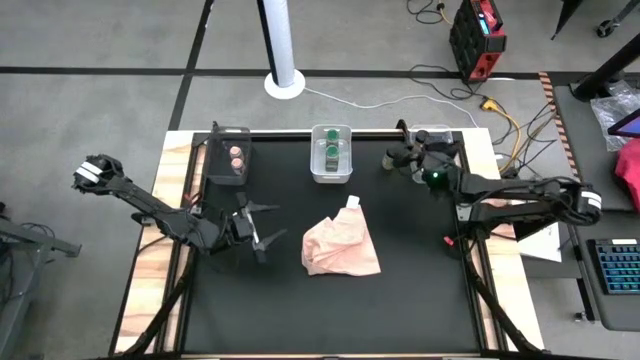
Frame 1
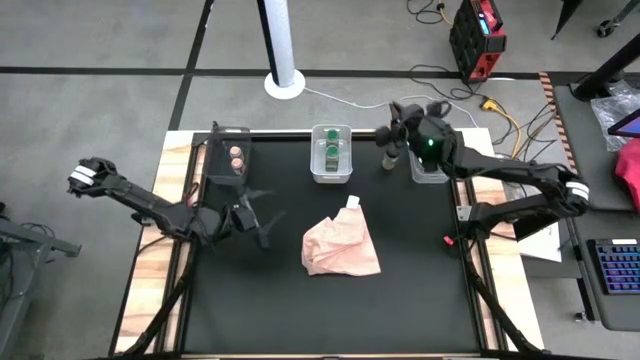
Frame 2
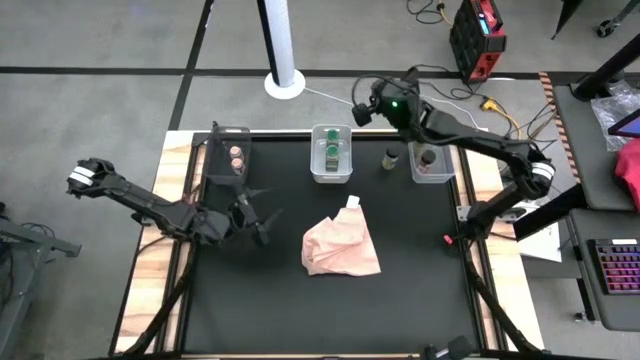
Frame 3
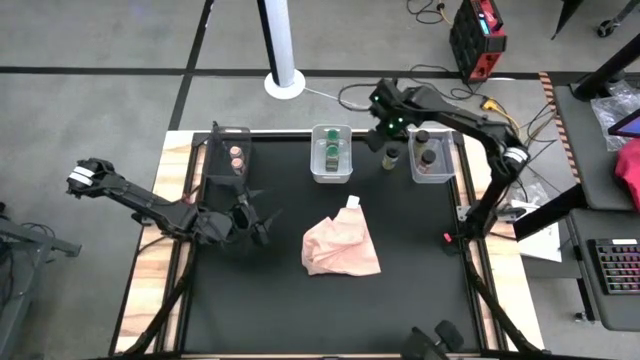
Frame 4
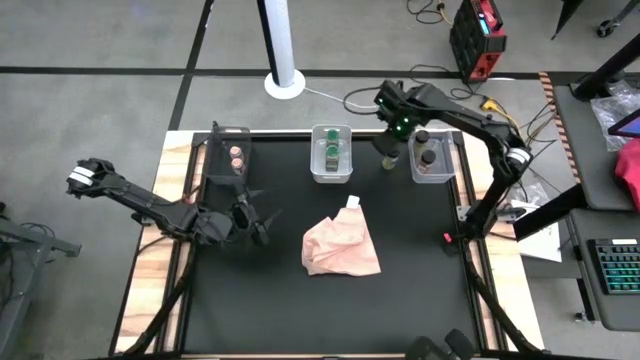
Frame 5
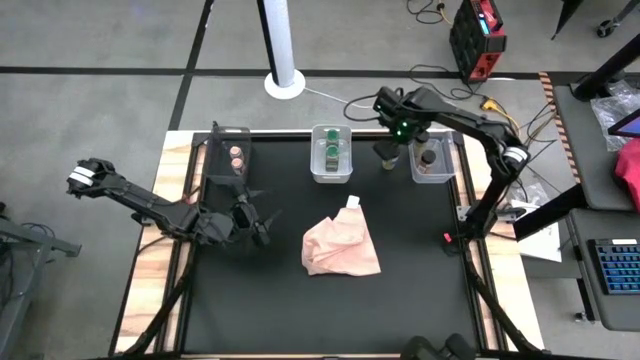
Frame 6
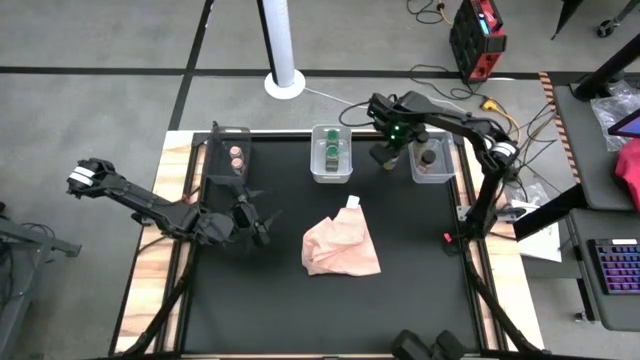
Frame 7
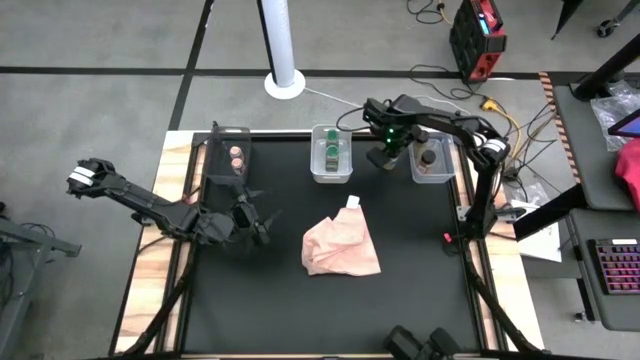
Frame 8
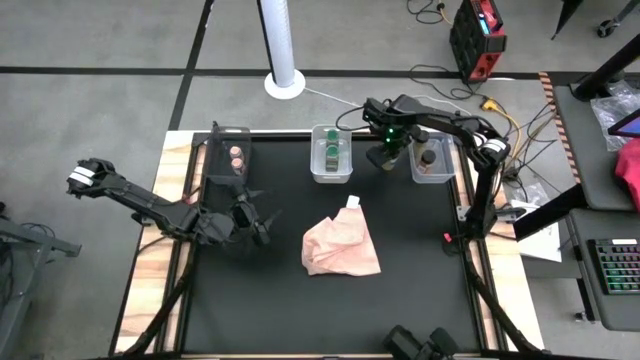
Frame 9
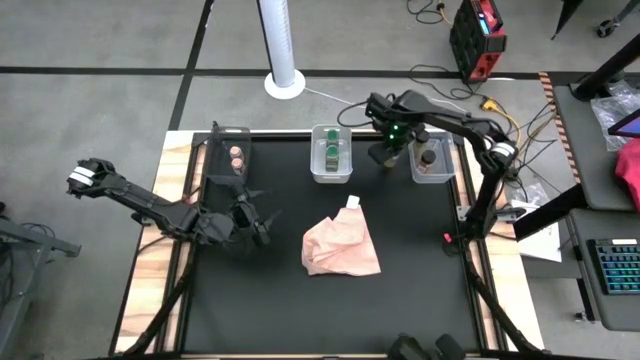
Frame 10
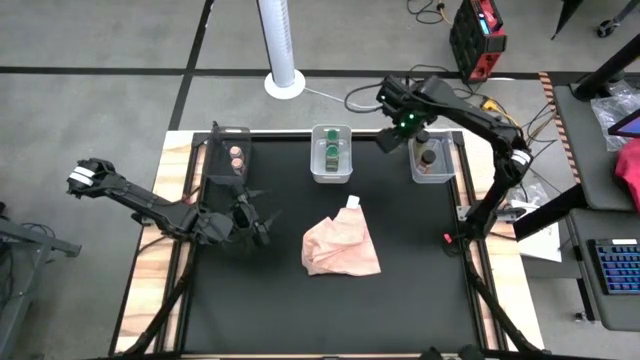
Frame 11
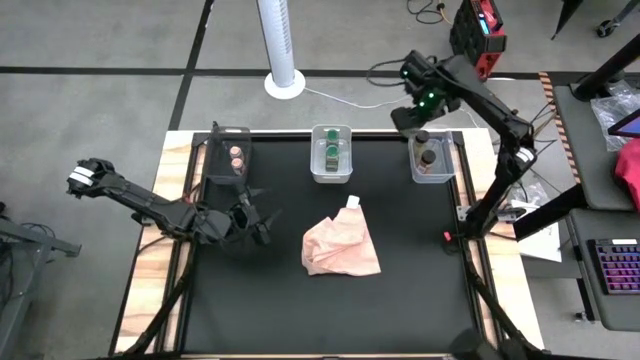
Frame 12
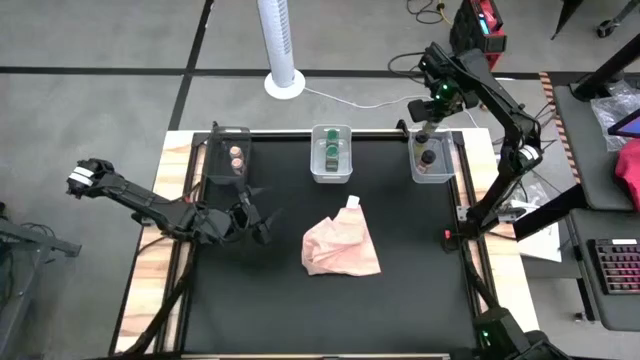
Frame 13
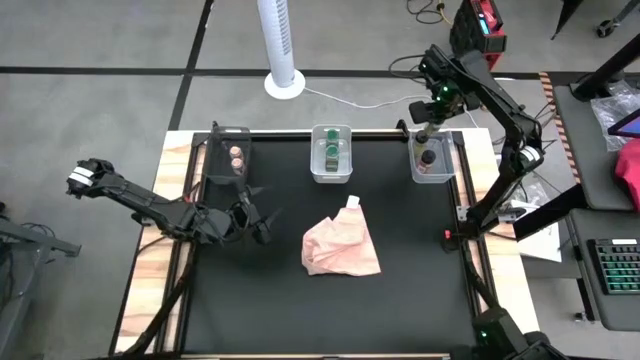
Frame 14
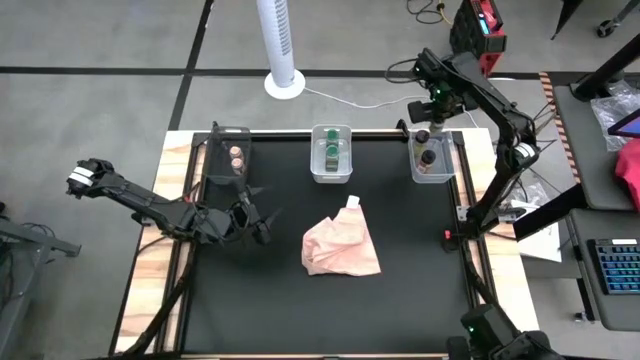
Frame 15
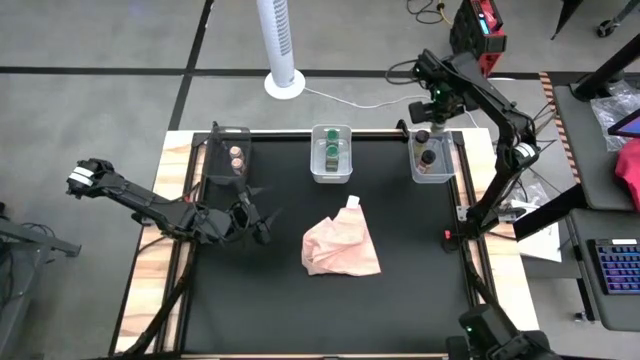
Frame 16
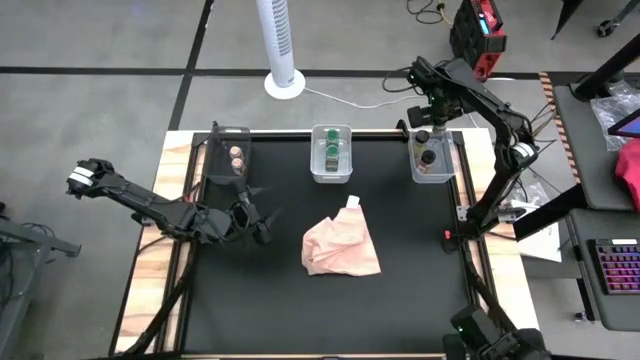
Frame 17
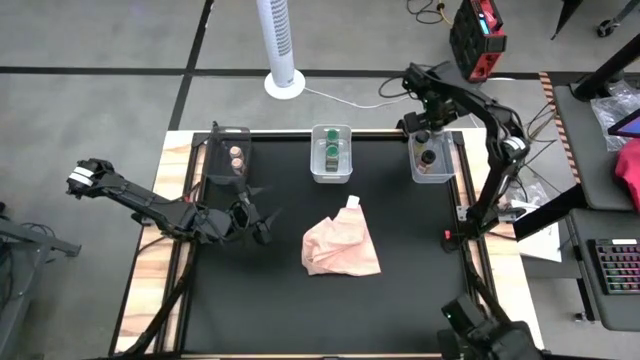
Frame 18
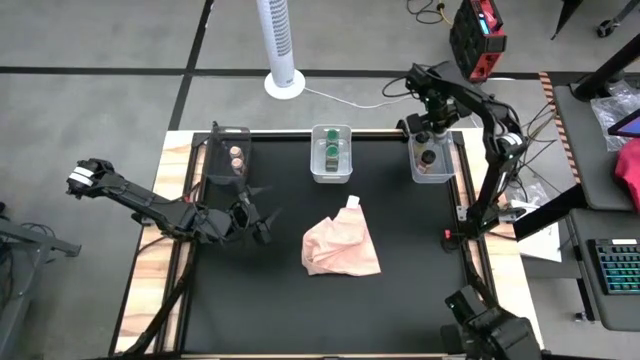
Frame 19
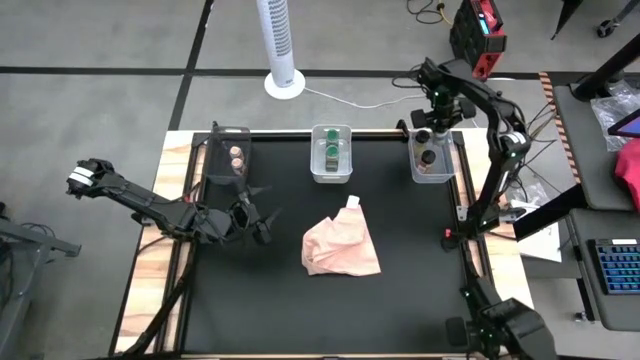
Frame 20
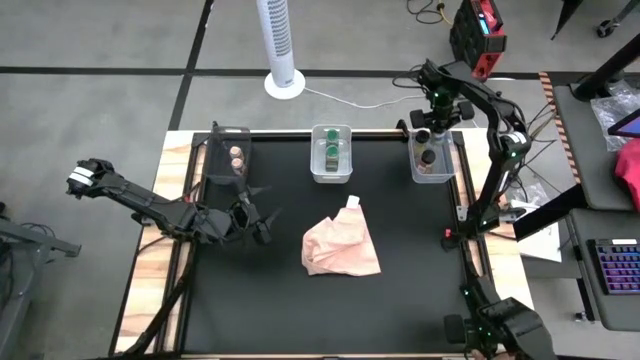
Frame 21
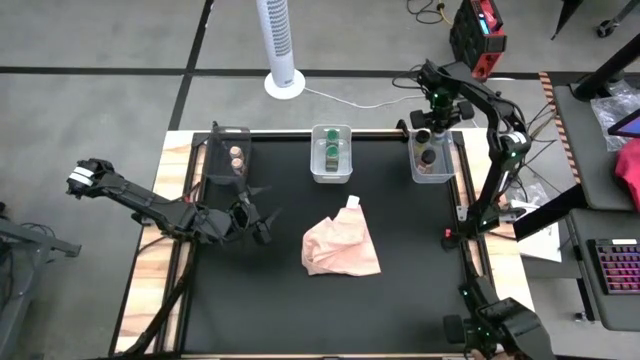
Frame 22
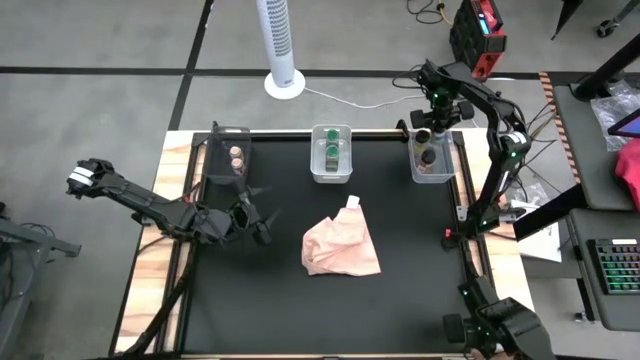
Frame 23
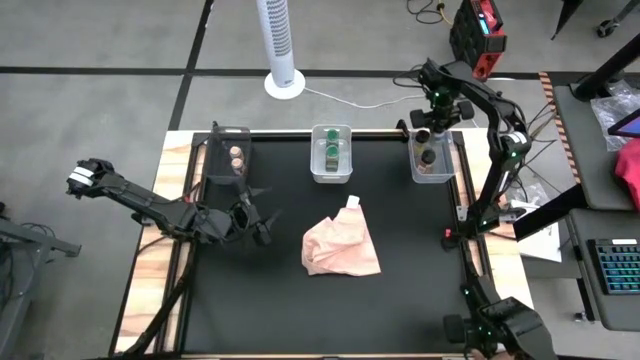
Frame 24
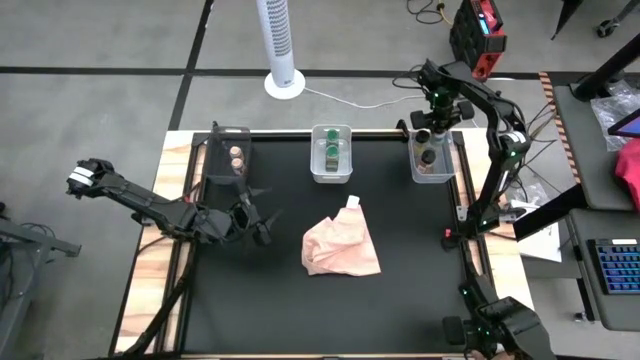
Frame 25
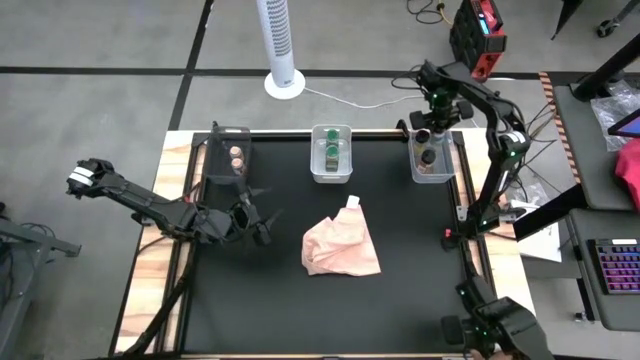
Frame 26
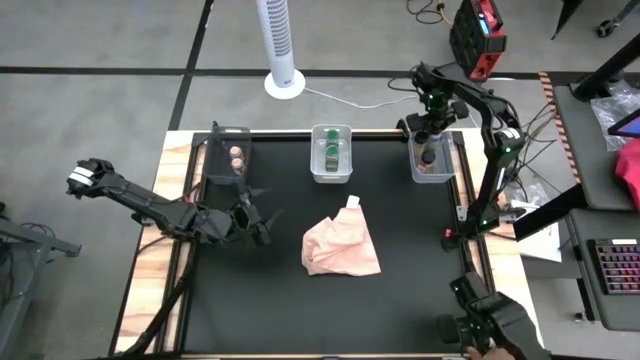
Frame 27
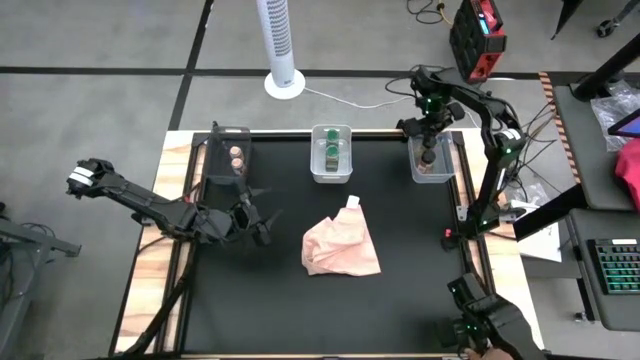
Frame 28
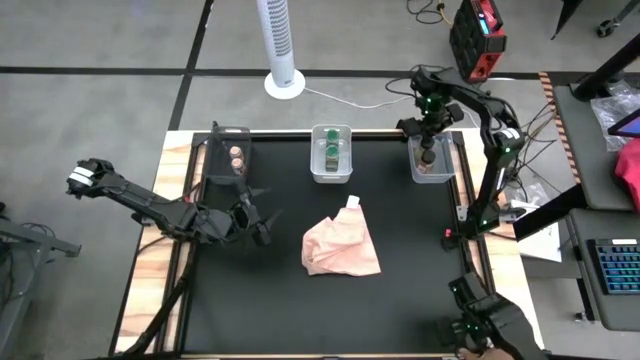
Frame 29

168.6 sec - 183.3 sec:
Task: Sort spices by type
Put the black spice bottle into the transparent bin

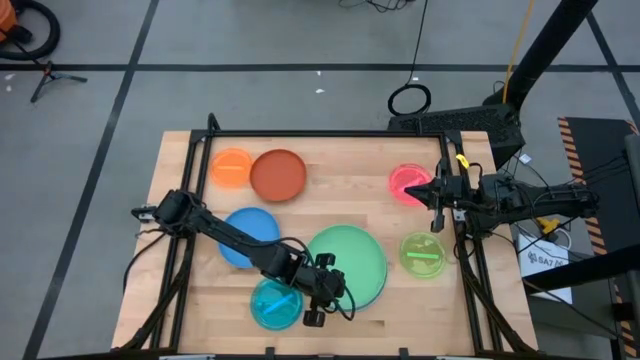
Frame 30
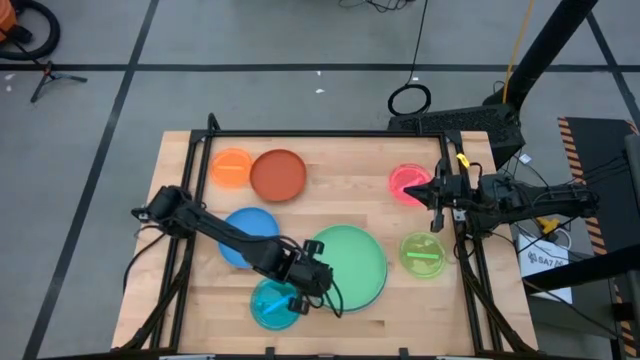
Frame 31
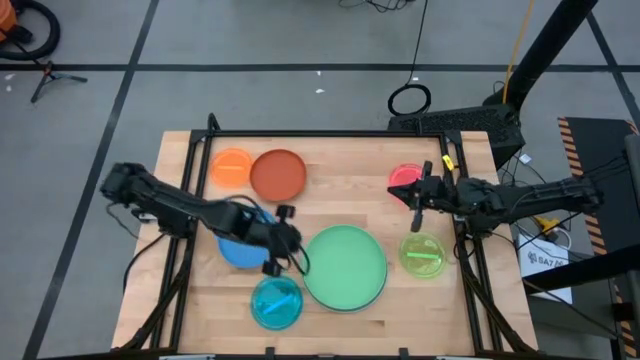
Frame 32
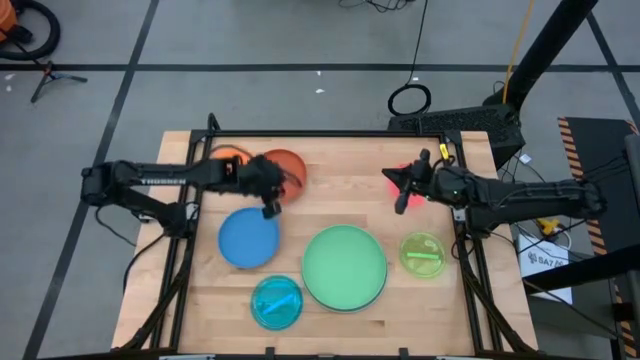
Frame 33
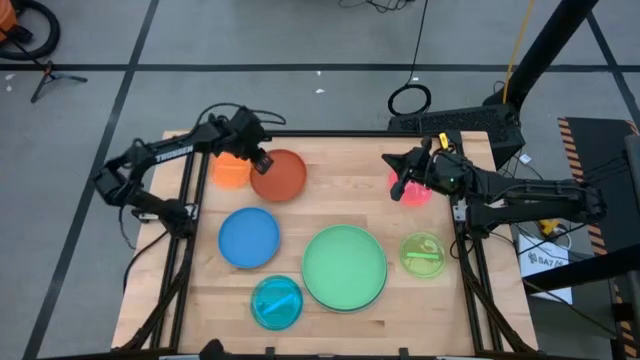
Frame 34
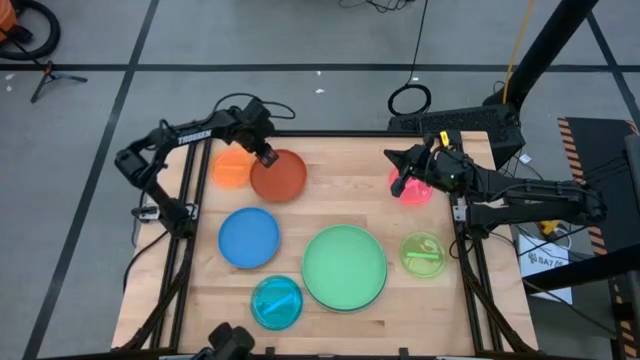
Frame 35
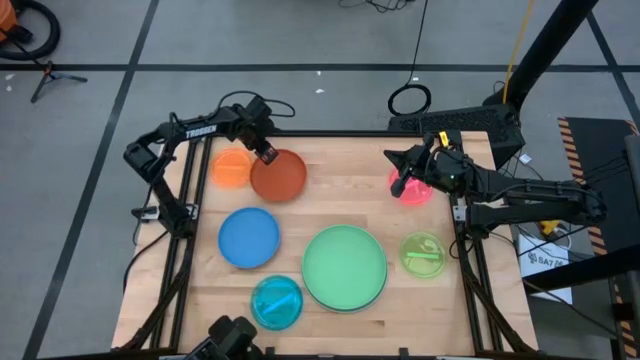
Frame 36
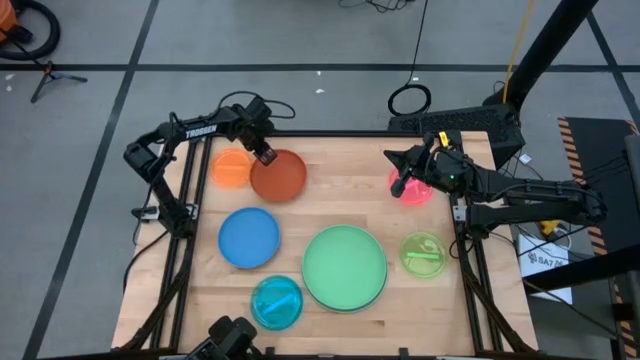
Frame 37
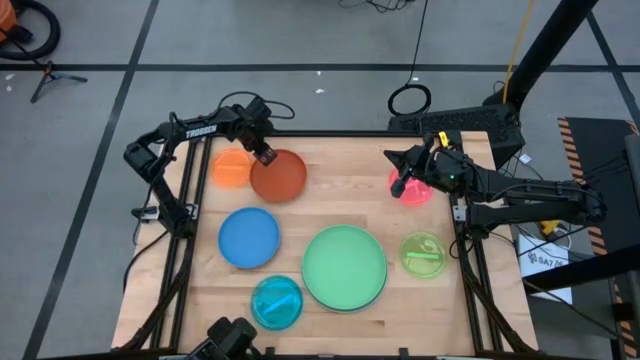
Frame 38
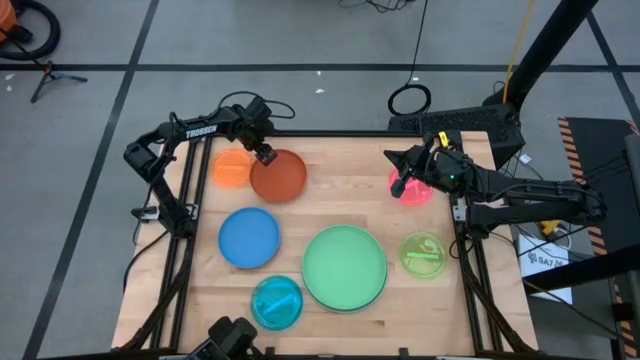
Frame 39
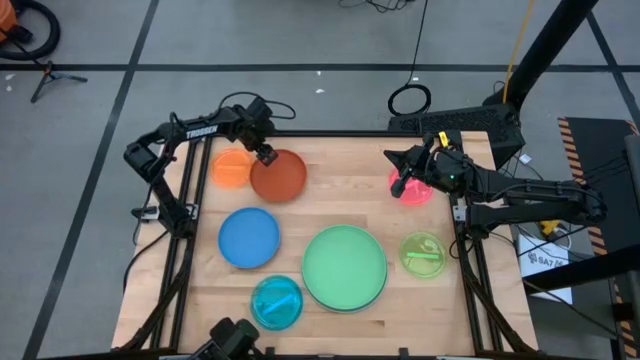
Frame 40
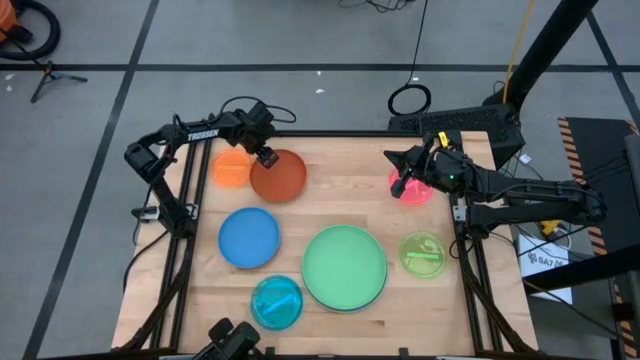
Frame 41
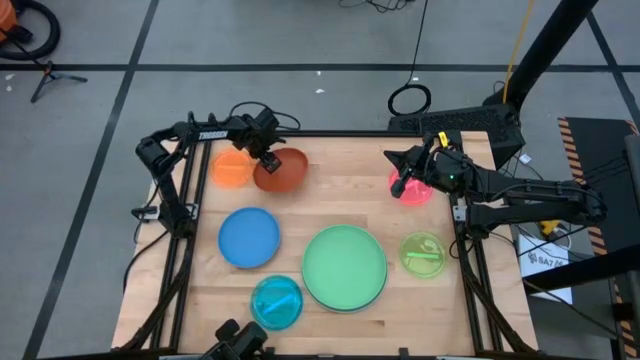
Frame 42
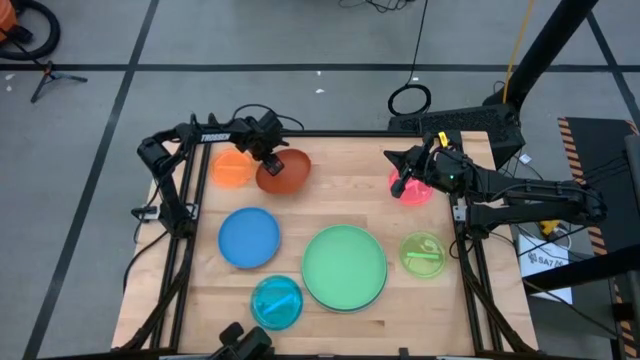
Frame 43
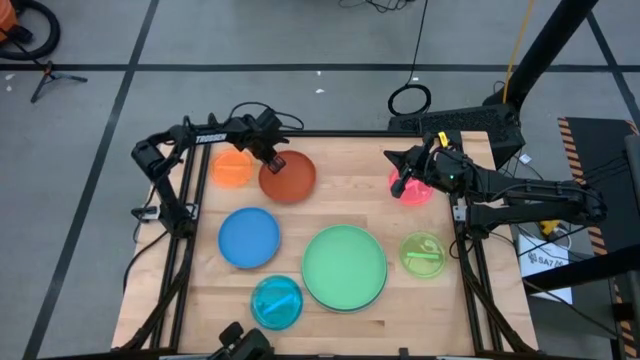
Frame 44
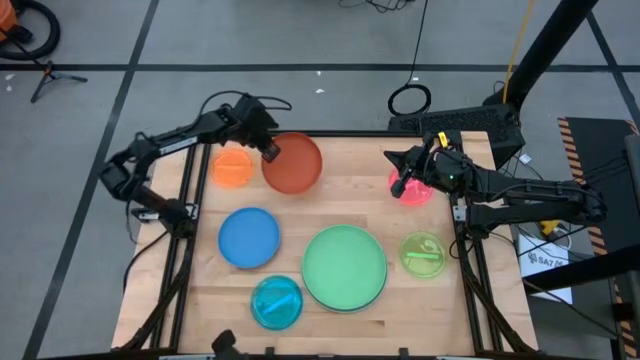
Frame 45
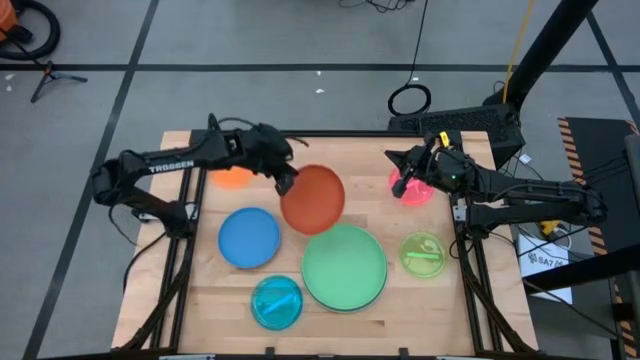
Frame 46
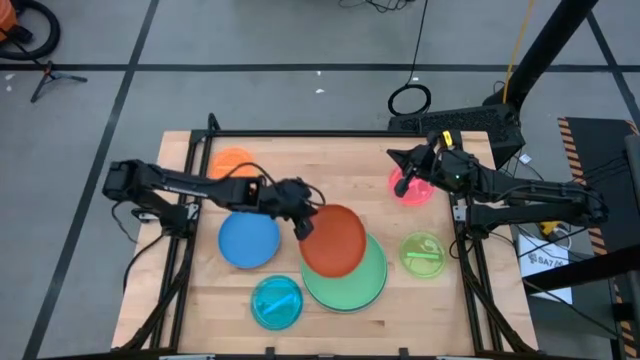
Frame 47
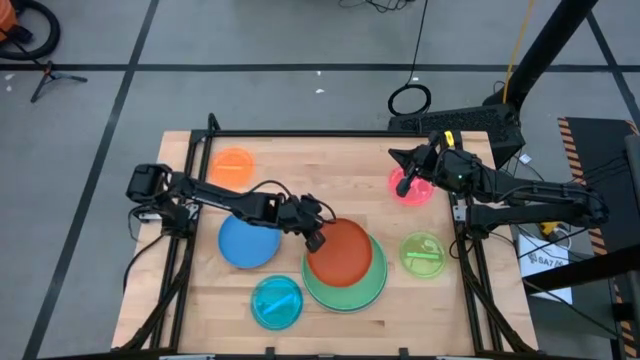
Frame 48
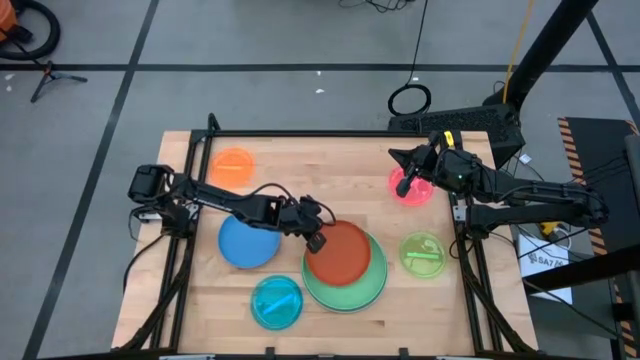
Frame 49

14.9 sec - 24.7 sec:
Task: Stack plastic plates
Stack the dark orange plate on the green plate
